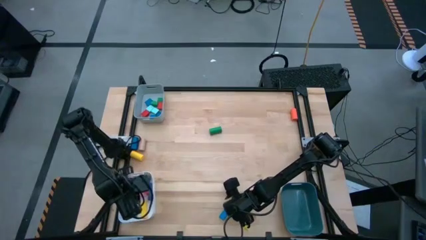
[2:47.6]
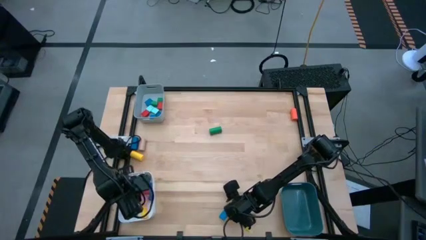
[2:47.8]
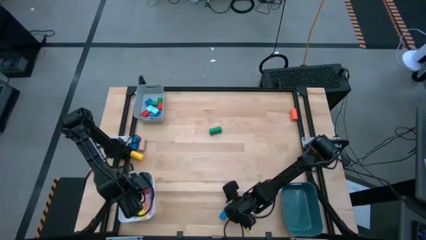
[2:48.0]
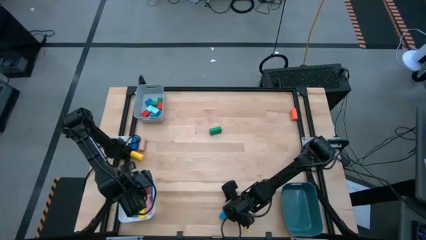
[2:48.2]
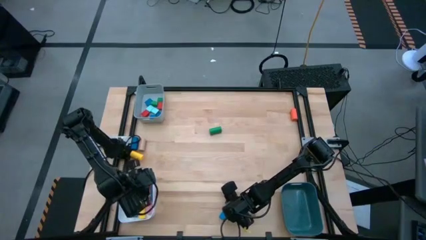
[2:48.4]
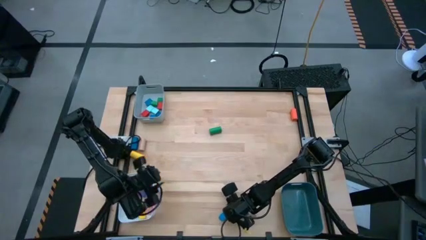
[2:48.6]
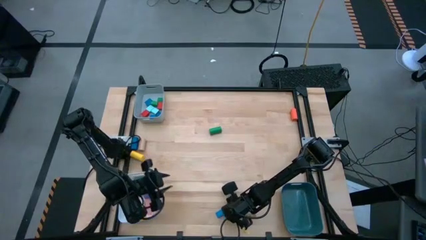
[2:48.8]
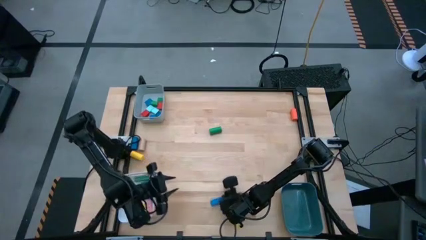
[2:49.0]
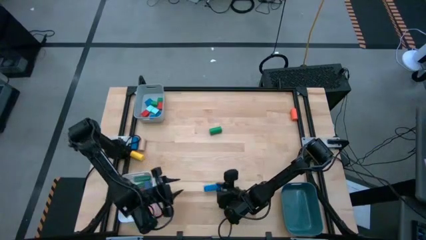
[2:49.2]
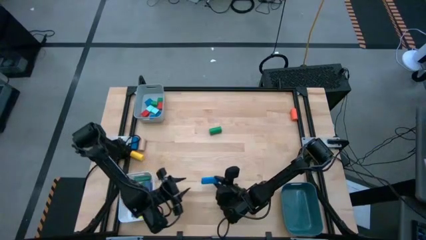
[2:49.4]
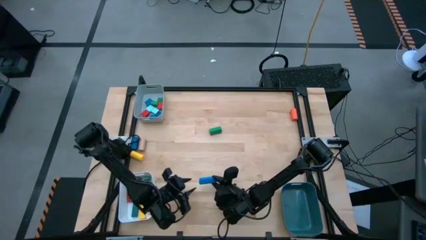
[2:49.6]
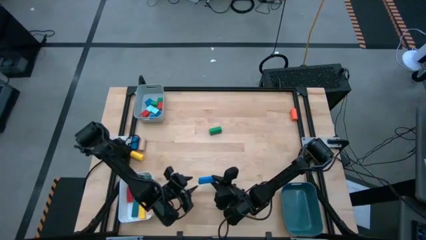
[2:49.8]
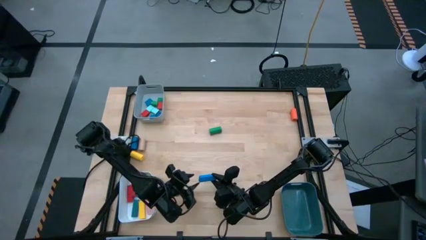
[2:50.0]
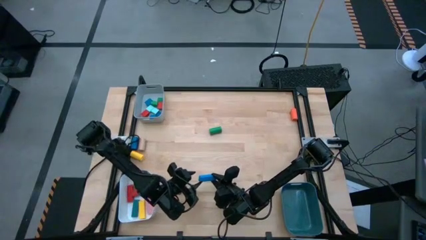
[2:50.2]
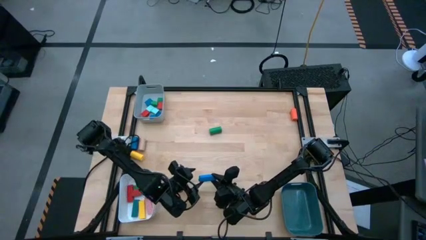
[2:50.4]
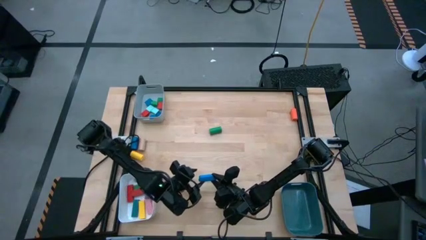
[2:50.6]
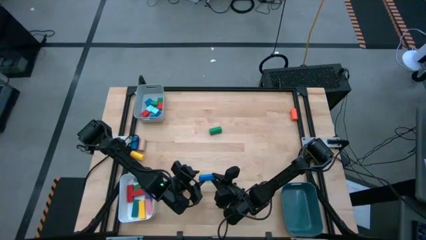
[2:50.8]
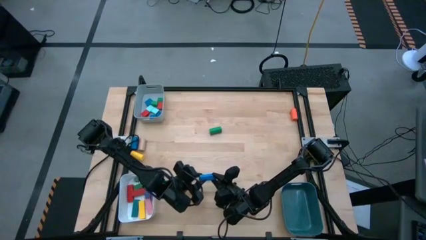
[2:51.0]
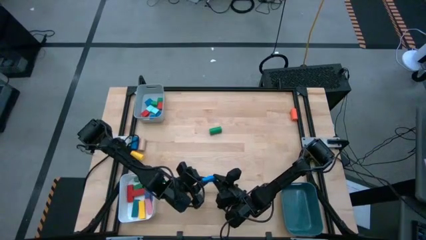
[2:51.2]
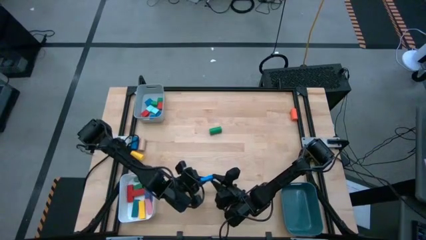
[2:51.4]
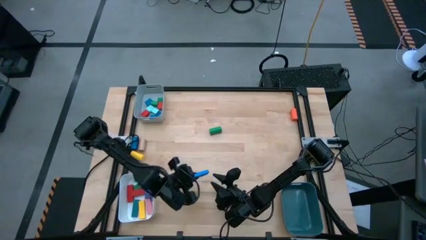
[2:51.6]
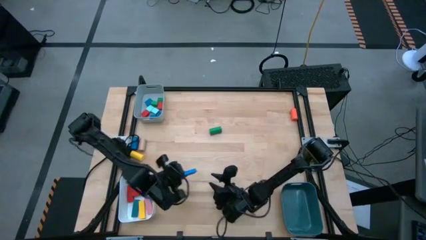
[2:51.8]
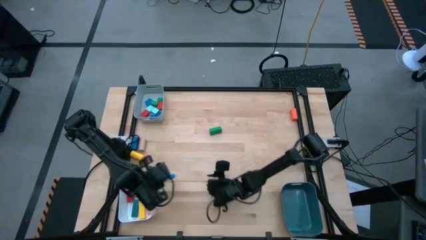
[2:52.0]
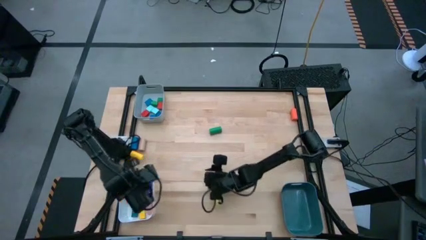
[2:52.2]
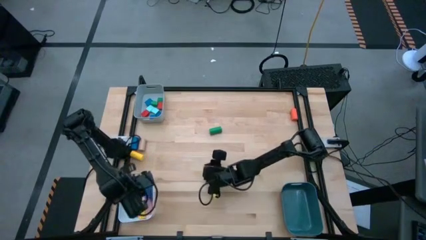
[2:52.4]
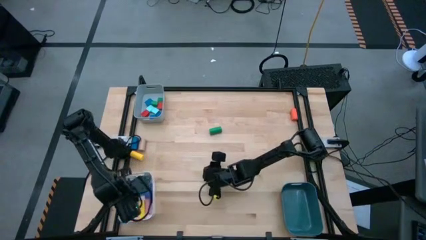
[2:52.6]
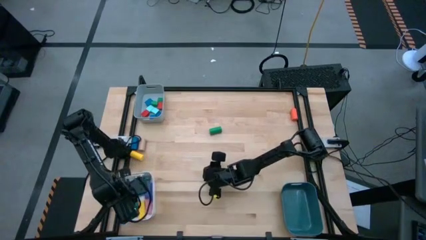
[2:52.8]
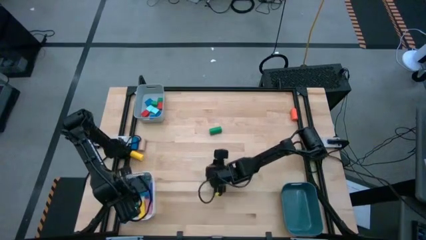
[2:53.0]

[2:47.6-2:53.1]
Task: Sort blocks by size
Put the light blue rectangular block into the white bin

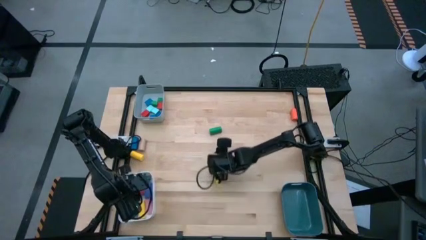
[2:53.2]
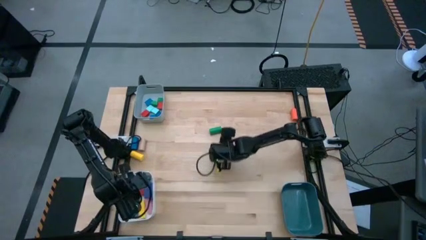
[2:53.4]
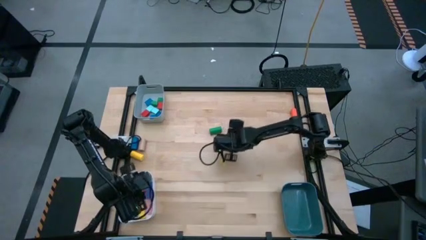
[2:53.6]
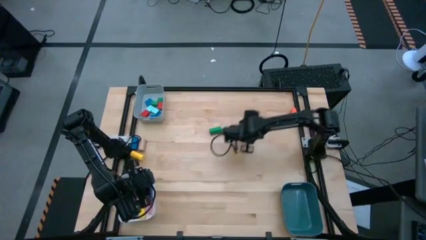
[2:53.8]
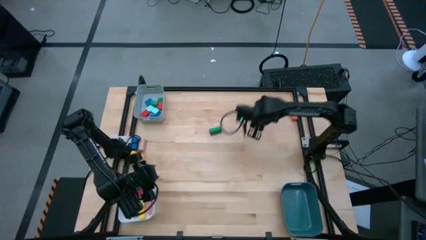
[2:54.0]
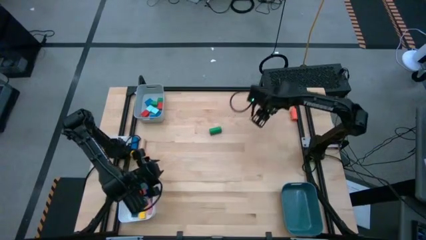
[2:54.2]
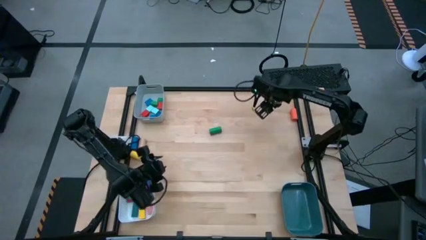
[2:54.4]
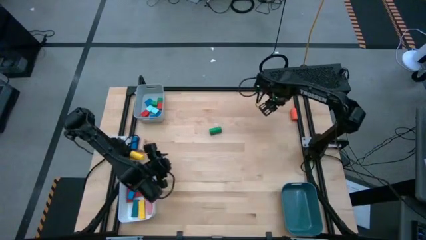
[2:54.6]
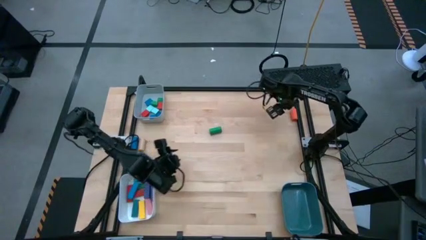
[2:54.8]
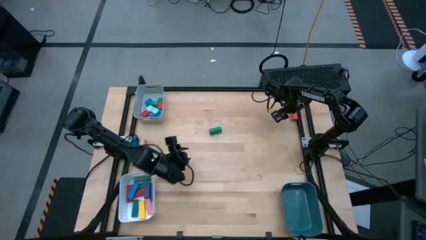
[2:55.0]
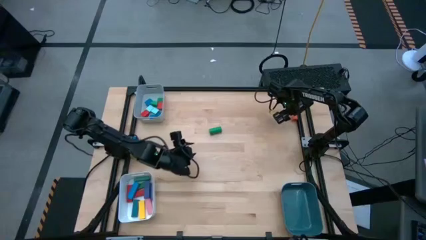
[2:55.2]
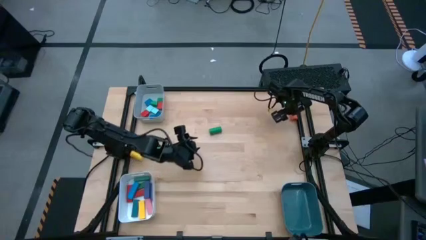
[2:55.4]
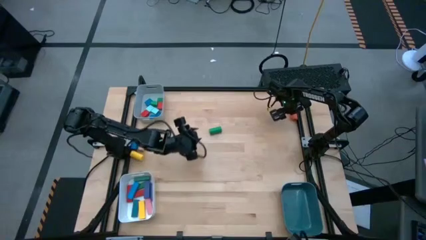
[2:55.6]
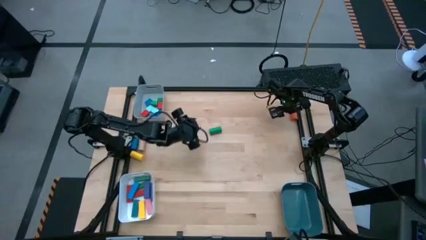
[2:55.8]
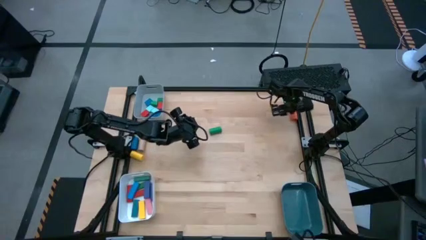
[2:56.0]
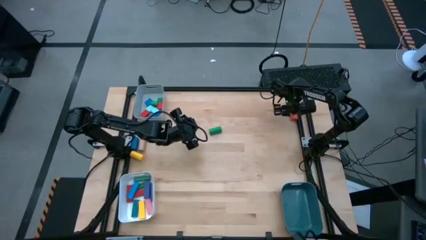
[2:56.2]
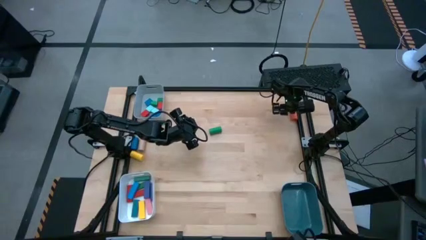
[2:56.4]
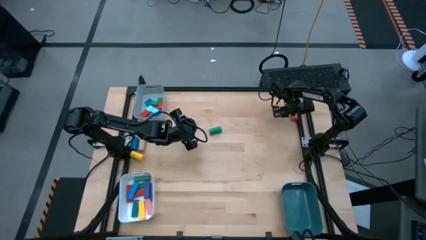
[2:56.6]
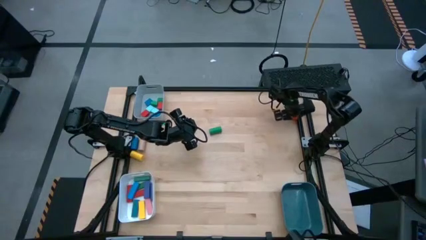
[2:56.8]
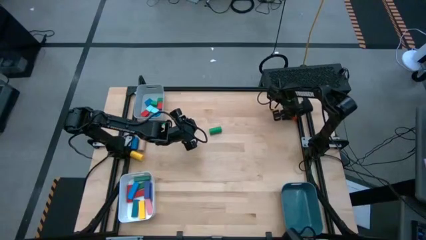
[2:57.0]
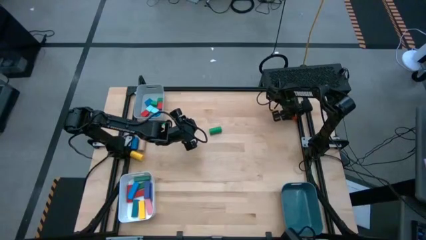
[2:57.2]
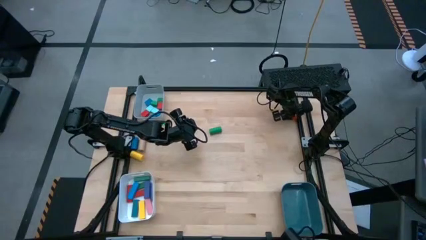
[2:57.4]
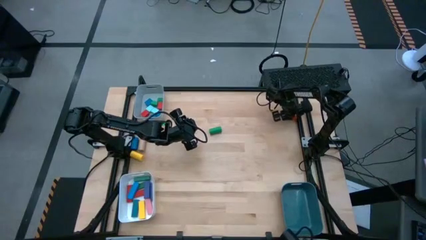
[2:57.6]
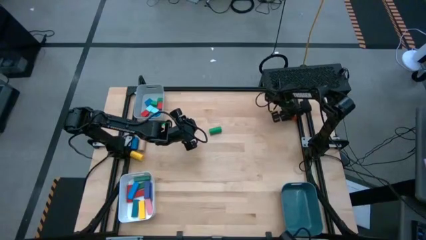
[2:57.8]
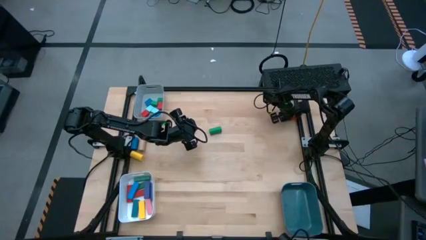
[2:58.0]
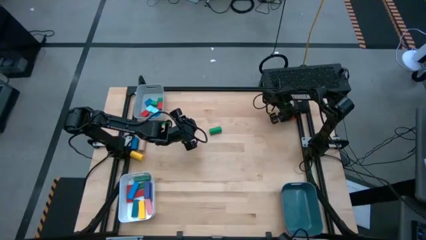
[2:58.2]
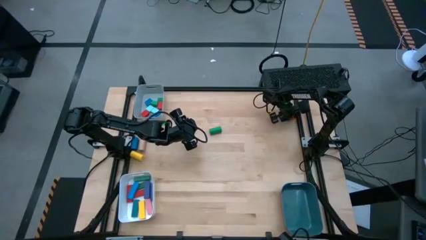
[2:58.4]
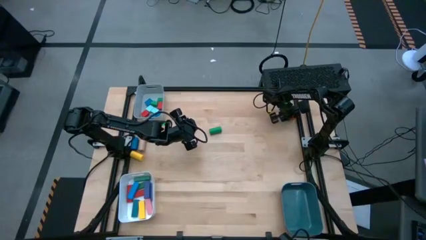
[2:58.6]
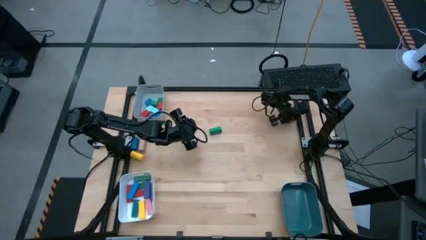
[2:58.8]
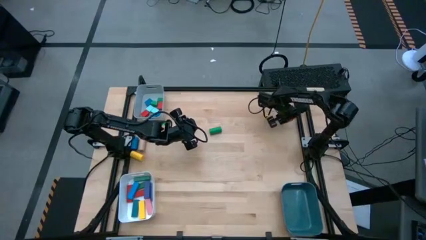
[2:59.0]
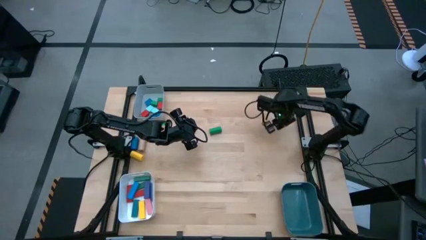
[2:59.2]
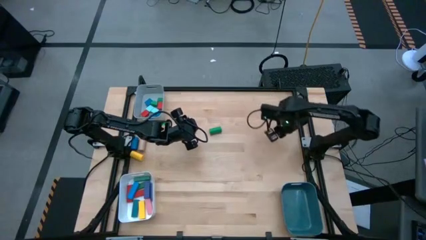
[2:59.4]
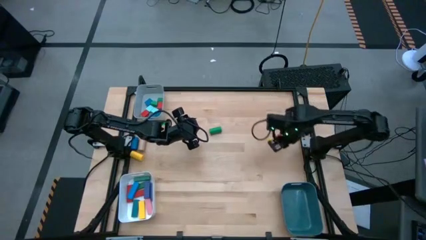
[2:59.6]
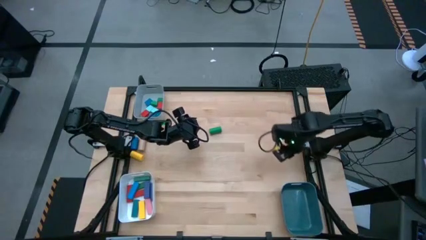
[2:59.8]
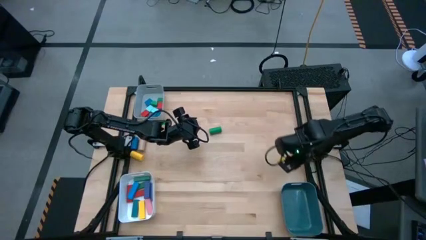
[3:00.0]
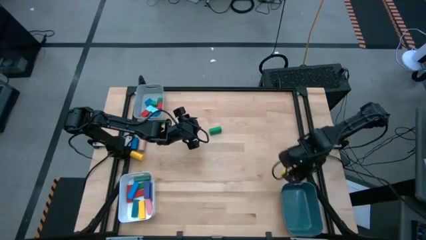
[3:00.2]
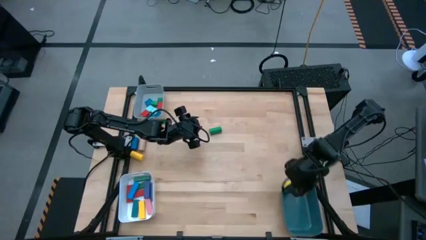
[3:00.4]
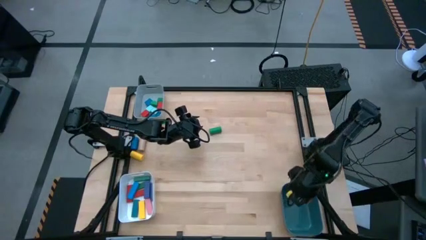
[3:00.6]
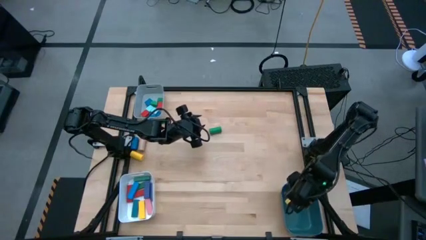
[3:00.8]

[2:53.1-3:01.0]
Put the orange cylindrical block into the blue green bin
